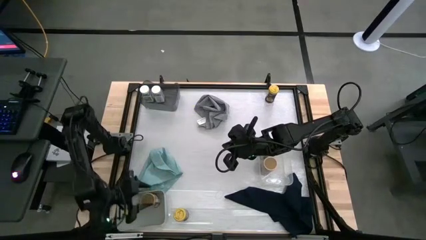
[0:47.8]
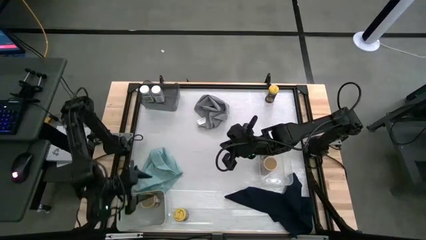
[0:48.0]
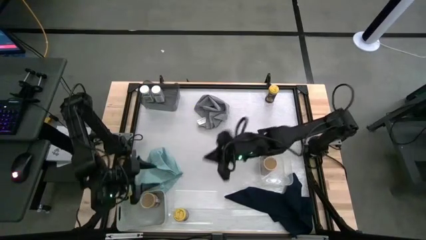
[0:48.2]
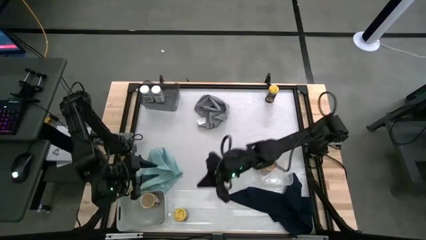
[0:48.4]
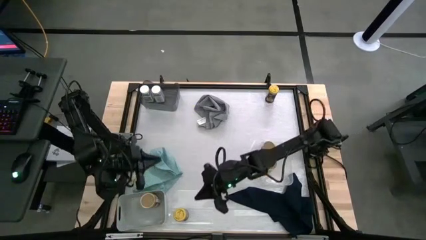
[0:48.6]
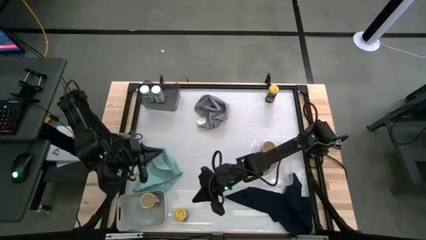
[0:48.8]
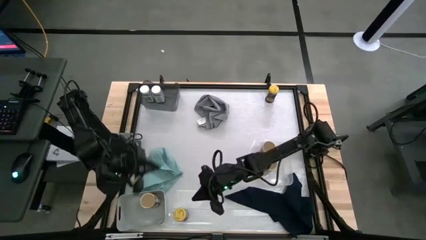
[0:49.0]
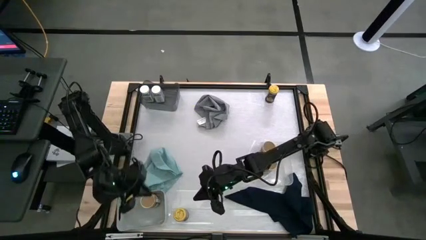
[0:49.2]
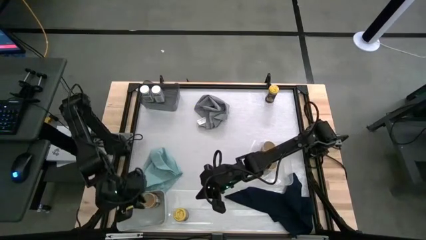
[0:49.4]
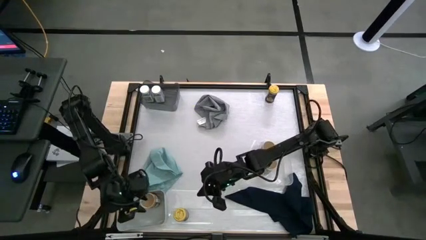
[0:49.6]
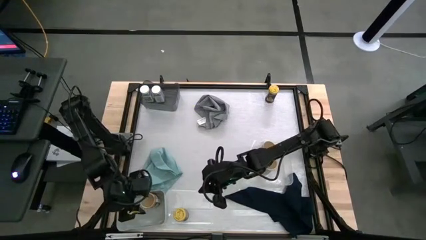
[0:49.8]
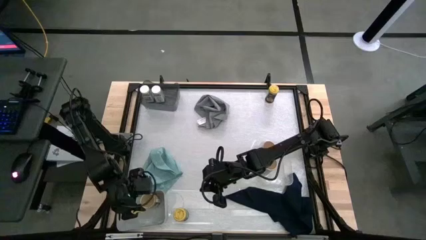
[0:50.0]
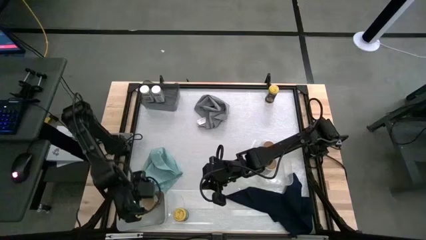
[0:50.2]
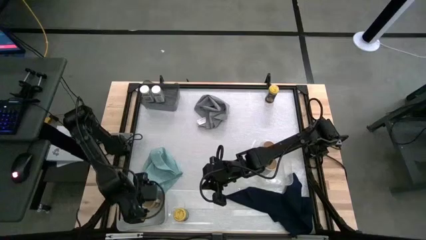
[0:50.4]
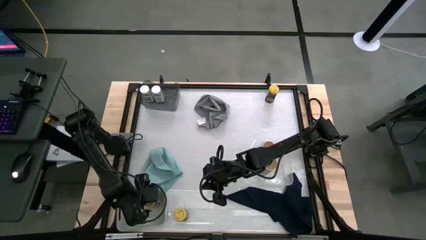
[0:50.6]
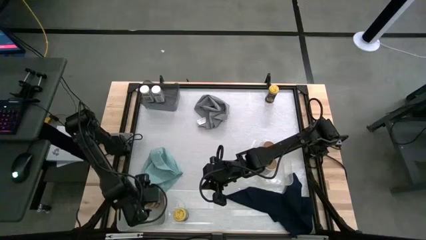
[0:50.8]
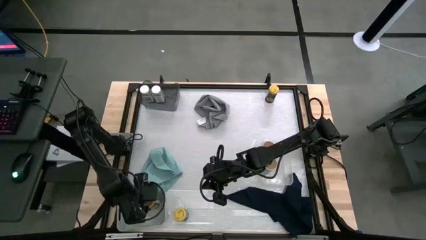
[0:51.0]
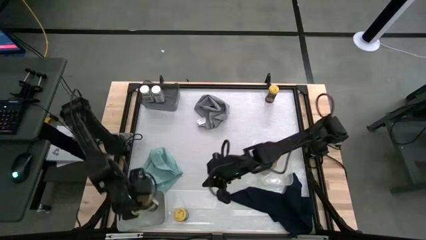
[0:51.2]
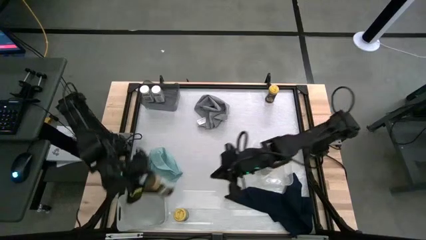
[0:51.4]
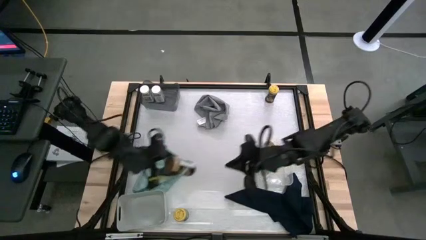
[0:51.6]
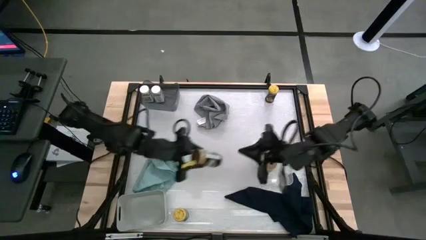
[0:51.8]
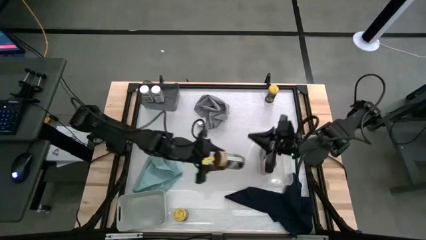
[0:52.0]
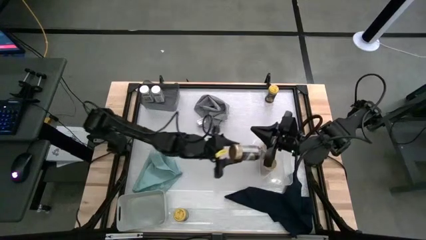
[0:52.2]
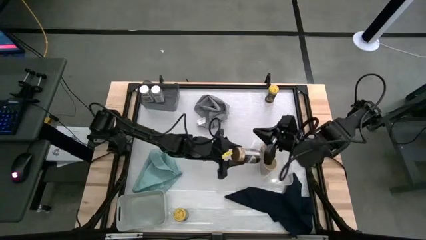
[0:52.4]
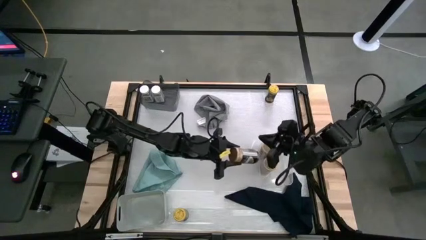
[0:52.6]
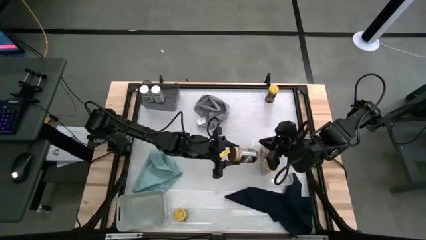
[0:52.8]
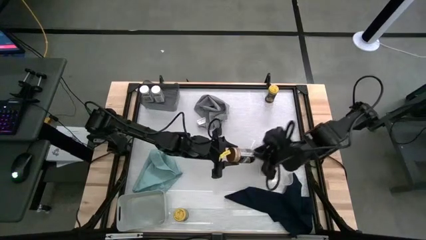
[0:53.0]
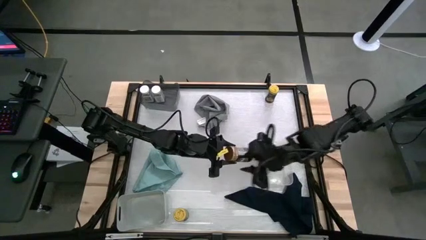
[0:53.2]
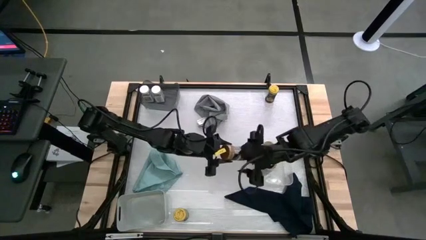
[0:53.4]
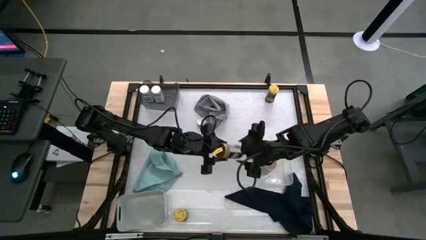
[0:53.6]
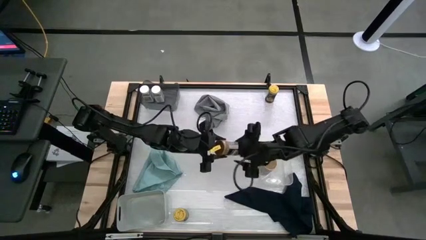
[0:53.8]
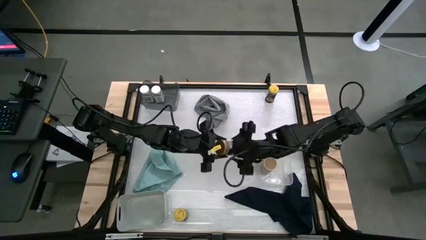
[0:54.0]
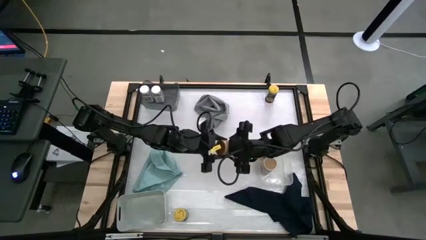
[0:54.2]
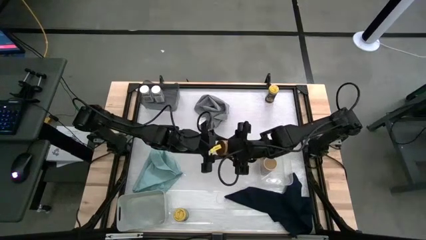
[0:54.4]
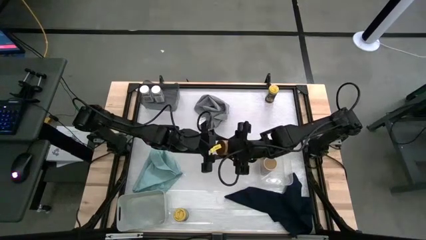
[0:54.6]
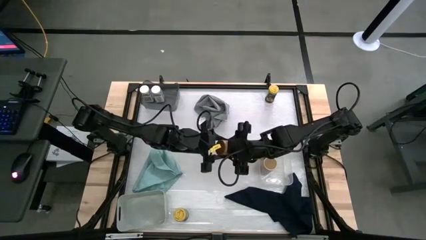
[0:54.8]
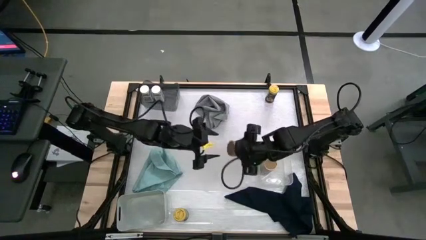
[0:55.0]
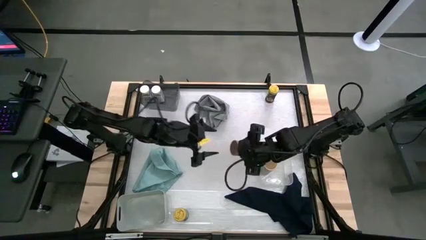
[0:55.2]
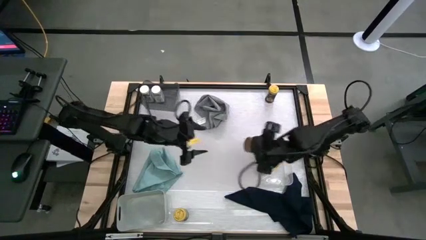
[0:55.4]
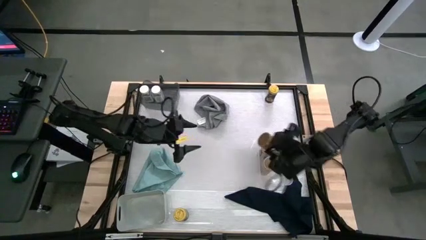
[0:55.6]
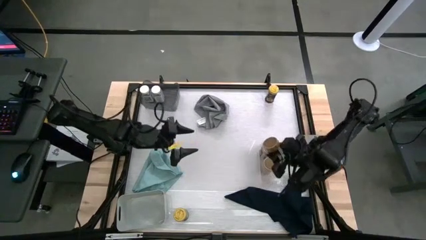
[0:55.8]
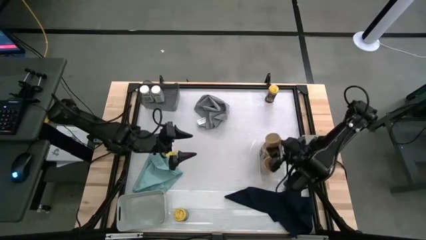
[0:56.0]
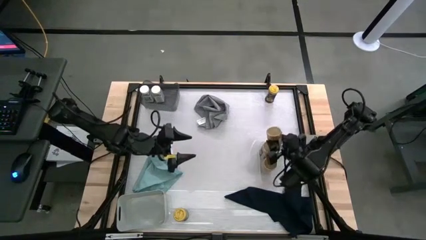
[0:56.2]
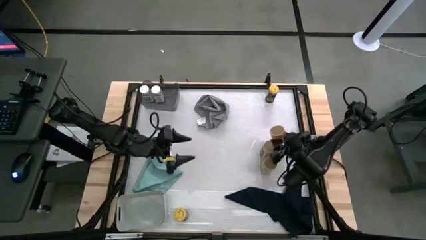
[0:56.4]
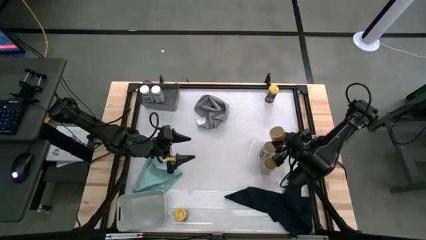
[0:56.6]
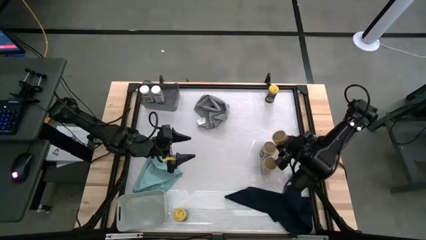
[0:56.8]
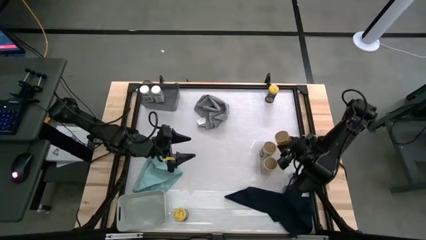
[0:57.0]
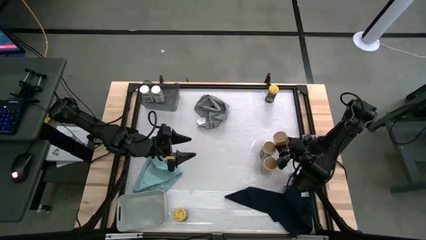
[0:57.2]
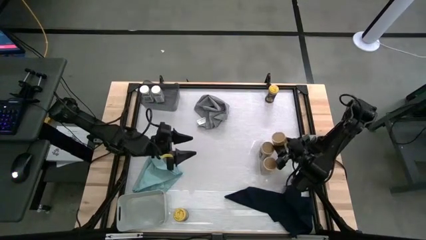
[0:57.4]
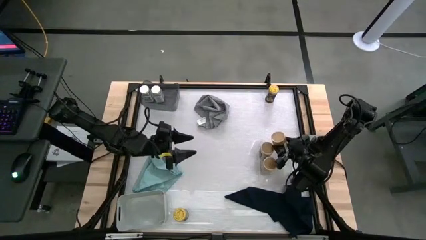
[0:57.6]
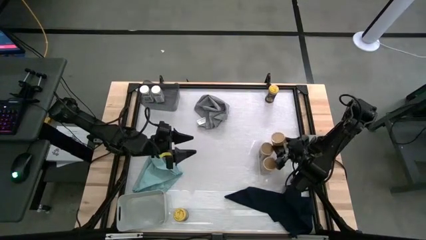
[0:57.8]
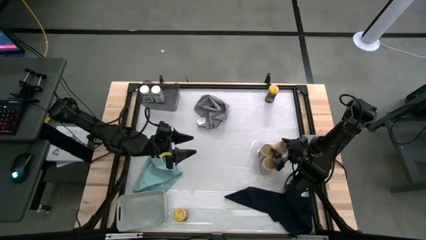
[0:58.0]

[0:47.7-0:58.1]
Task: Sort spices by type
Put the brown seasoning bottle into the transparent bin

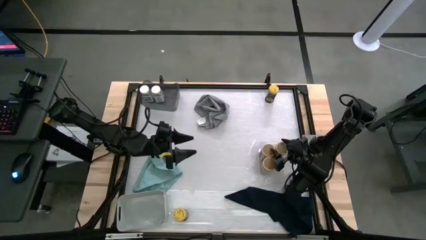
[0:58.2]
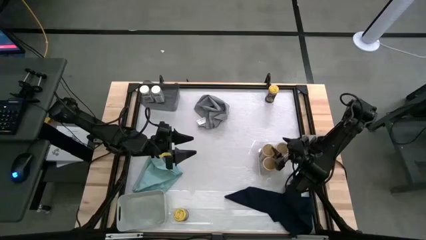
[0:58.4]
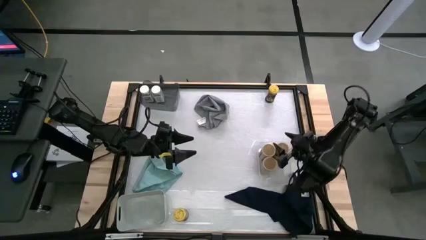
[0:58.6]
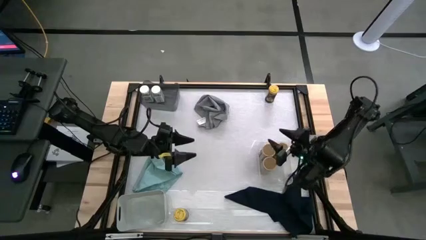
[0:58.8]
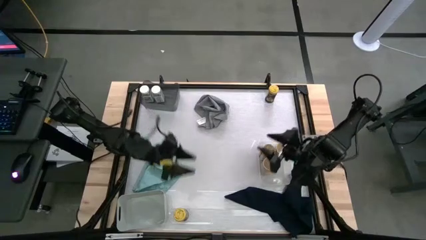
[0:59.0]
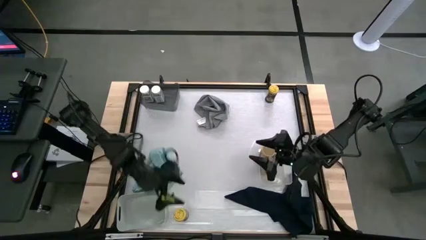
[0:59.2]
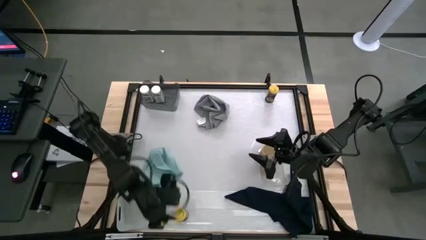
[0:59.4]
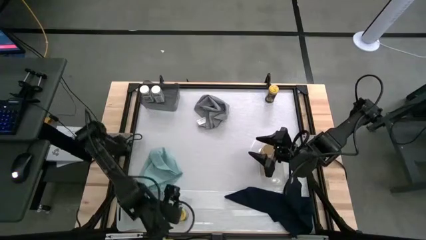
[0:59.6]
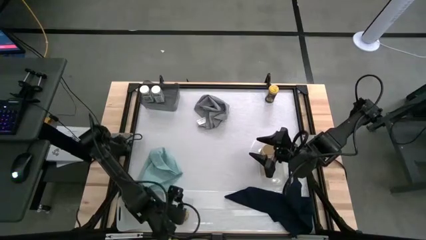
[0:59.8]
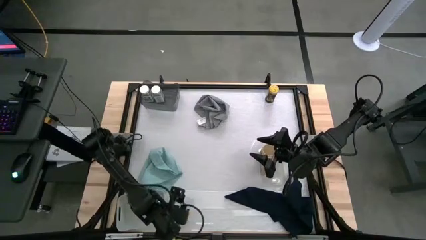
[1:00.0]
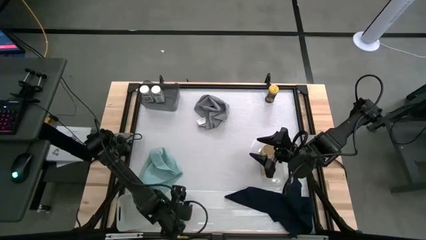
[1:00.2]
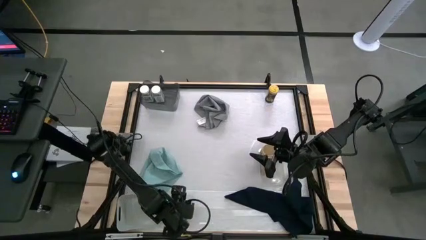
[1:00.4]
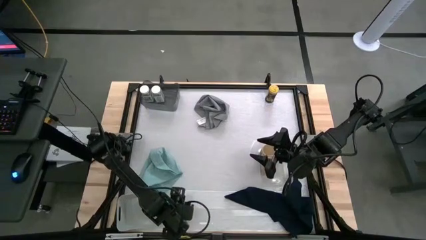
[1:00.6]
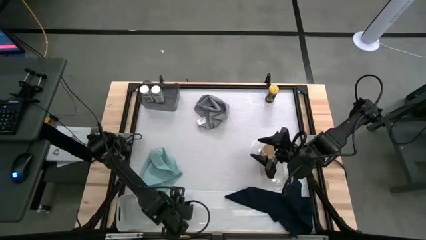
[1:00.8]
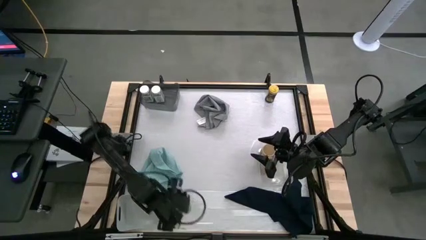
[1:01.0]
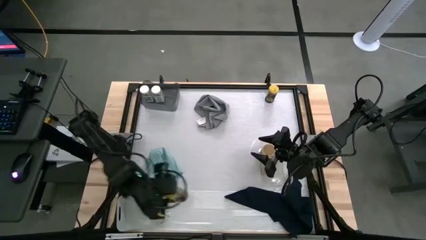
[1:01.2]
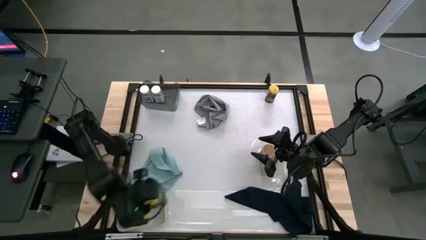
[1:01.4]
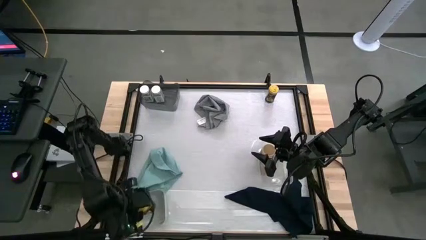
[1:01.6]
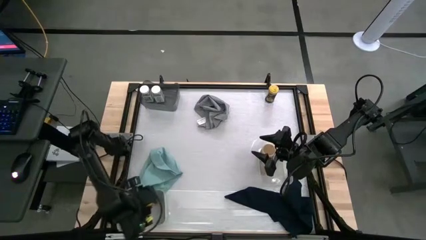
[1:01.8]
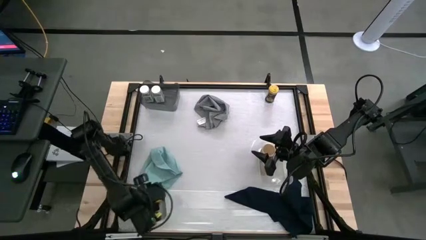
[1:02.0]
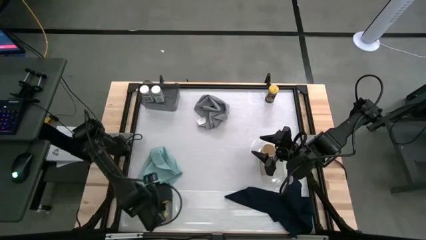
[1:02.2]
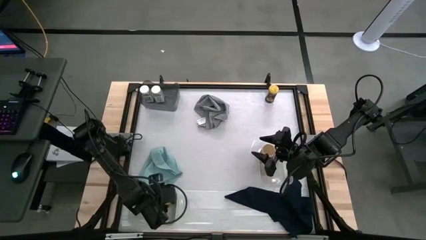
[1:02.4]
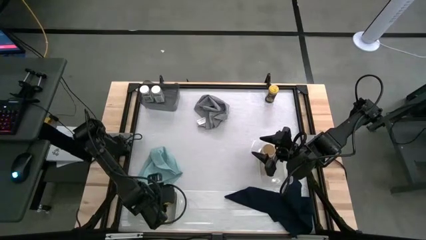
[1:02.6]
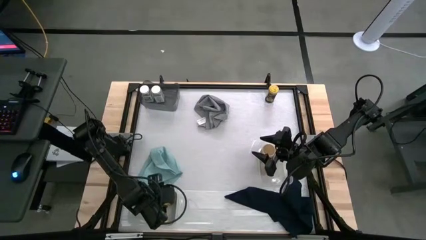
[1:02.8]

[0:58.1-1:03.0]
Put the bottom yellow seasoning bottle into the gray bin

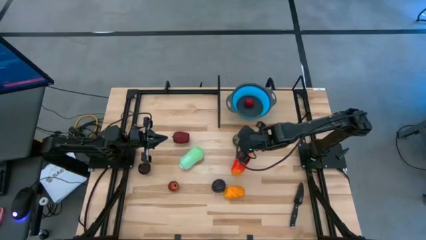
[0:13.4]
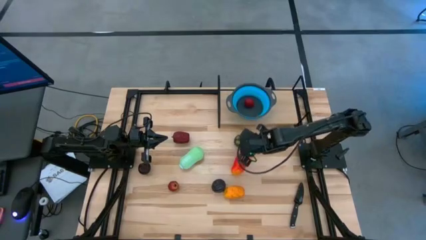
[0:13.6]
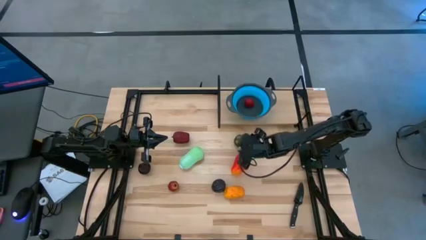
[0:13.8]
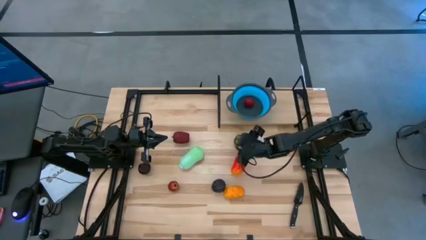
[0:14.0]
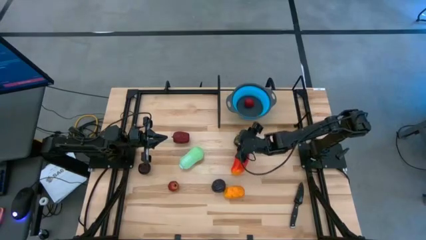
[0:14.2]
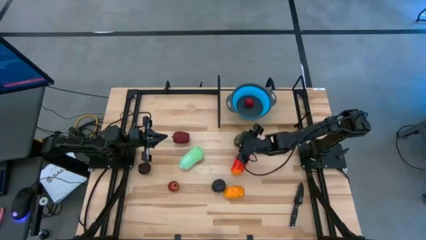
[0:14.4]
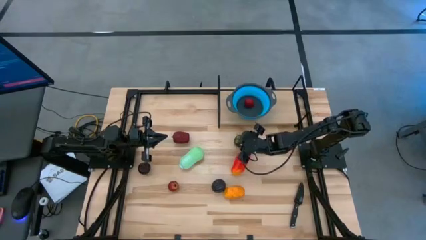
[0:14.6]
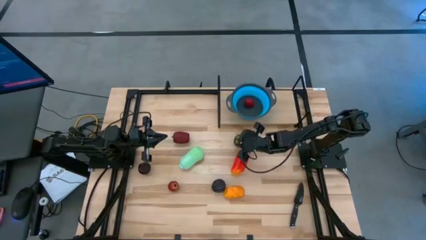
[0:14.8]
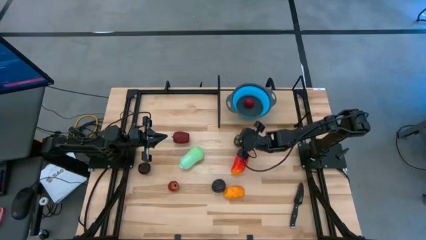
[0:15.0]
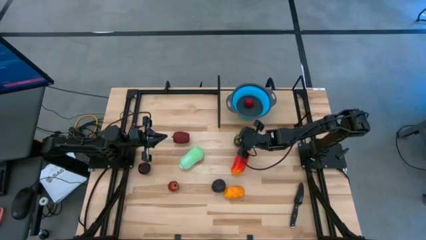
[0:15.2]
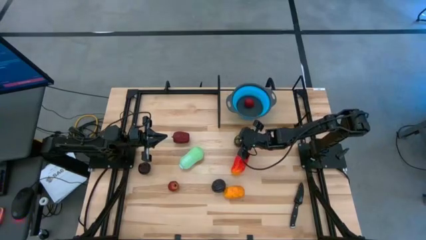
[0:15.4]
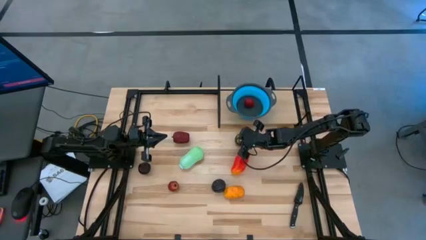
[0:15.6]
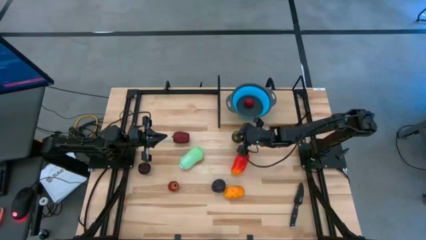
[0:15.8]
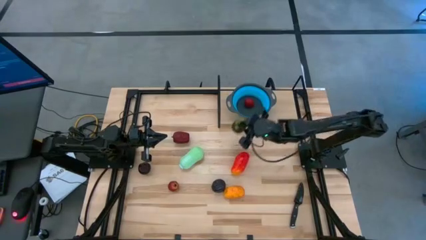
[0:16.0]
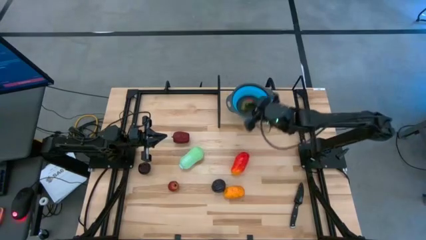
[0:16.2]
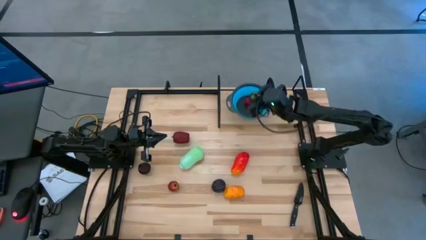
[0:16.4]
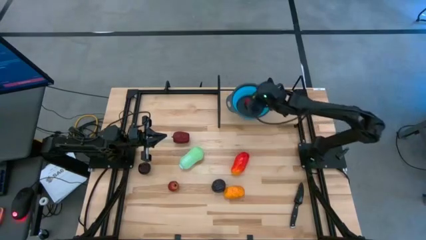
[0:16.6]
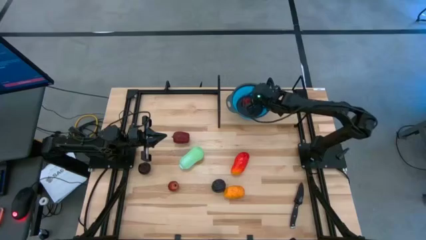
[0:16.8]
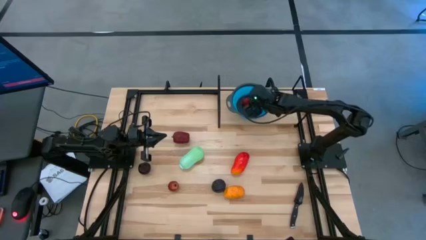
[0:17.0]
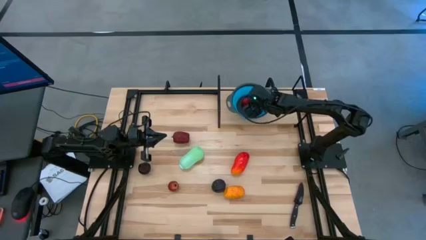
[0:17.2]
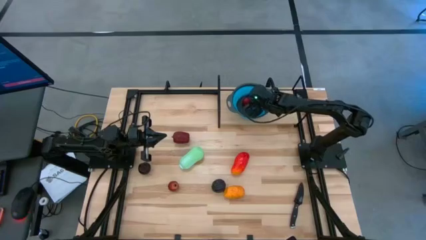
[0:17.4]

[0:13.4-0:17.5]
Task: Pick & Place Fruit
Put the black mangosteen into the blue strainer bowl on the shelf
